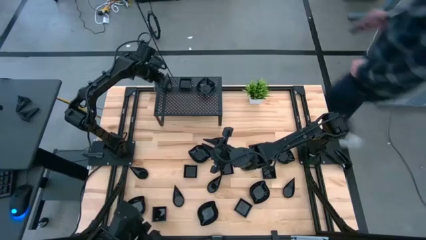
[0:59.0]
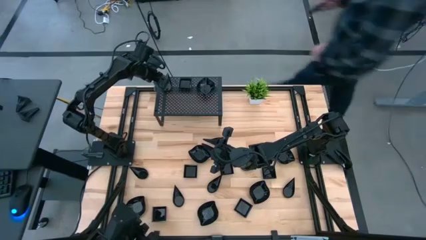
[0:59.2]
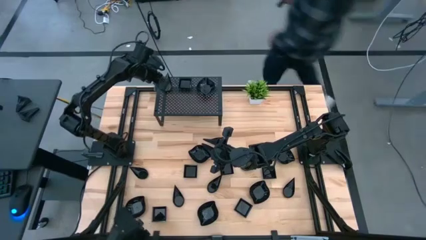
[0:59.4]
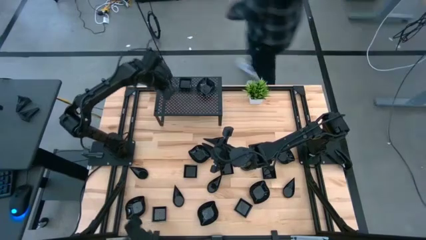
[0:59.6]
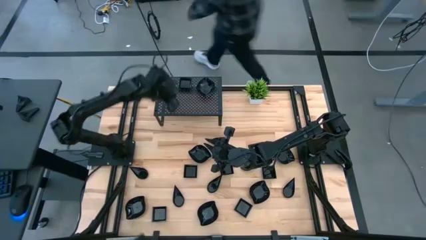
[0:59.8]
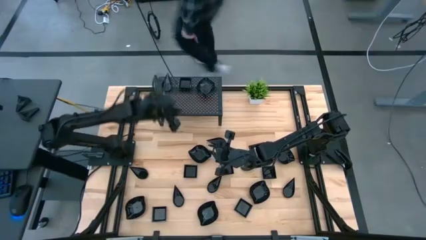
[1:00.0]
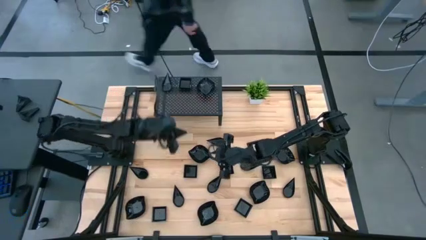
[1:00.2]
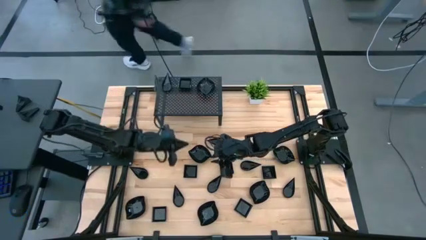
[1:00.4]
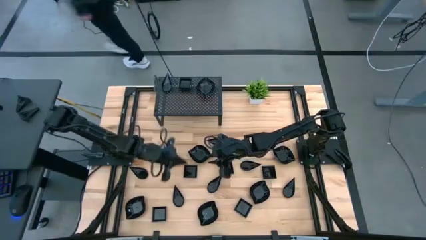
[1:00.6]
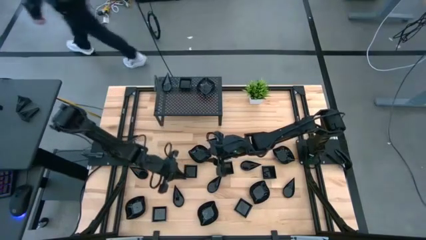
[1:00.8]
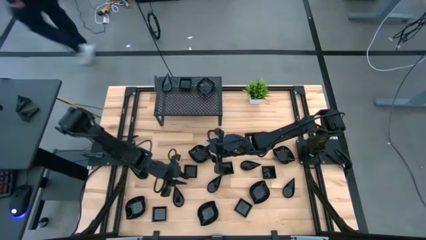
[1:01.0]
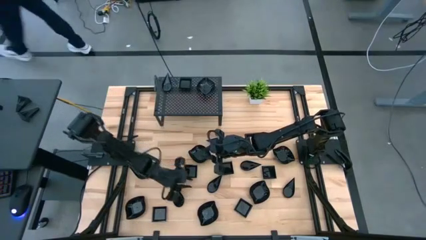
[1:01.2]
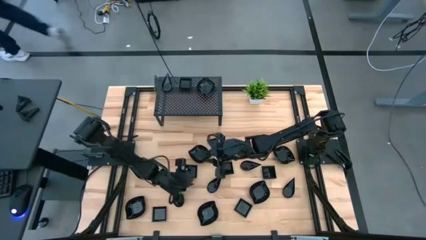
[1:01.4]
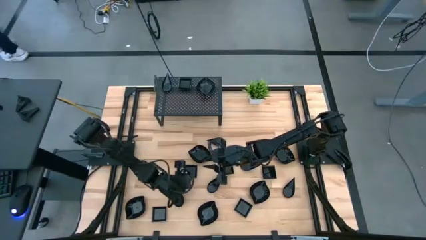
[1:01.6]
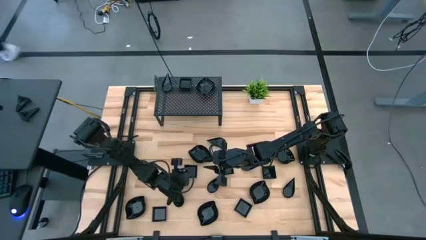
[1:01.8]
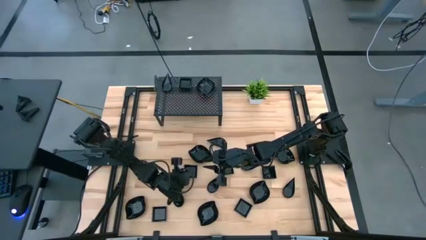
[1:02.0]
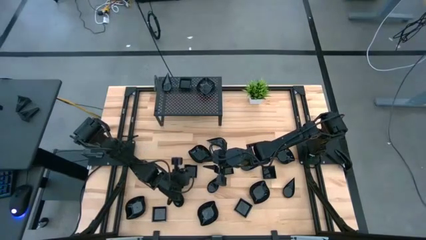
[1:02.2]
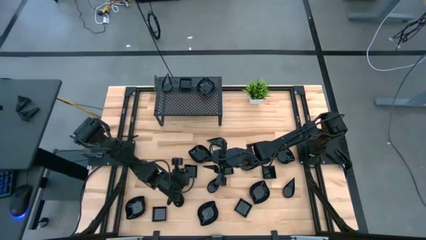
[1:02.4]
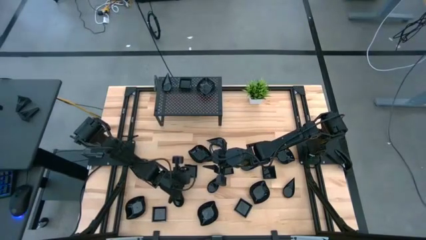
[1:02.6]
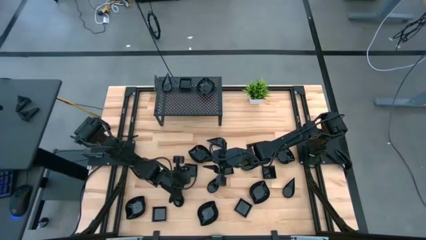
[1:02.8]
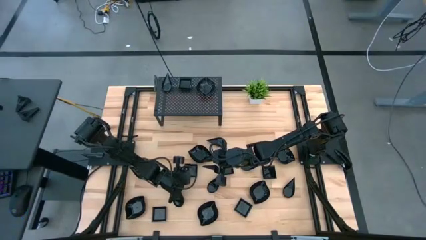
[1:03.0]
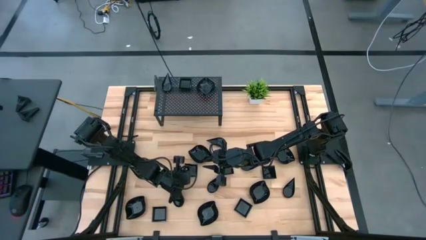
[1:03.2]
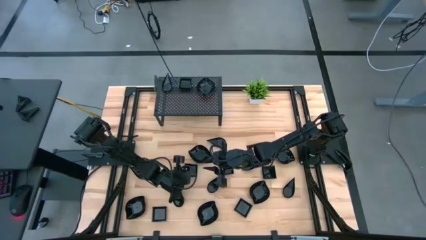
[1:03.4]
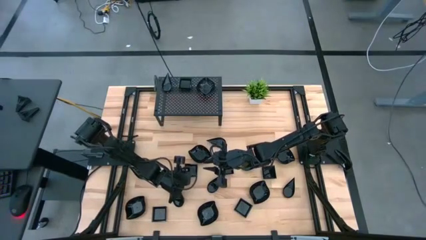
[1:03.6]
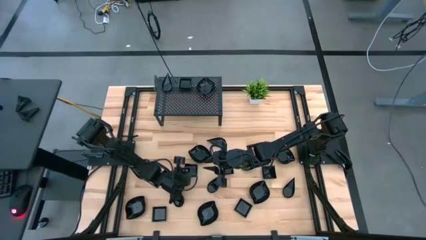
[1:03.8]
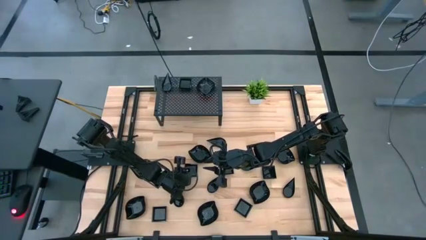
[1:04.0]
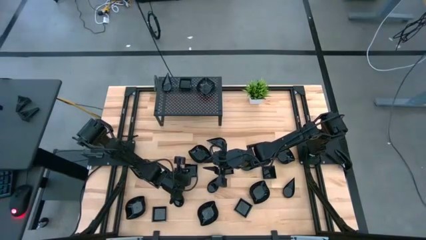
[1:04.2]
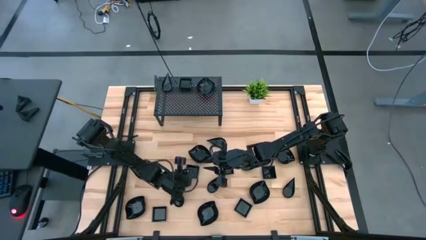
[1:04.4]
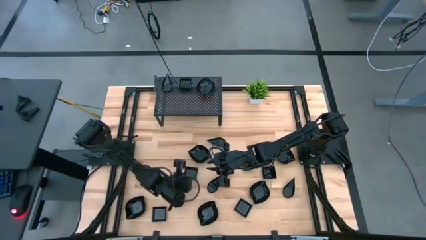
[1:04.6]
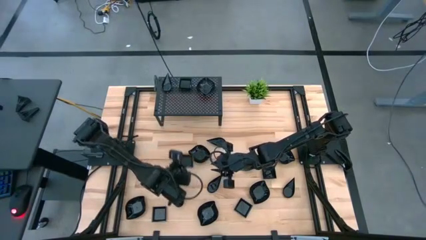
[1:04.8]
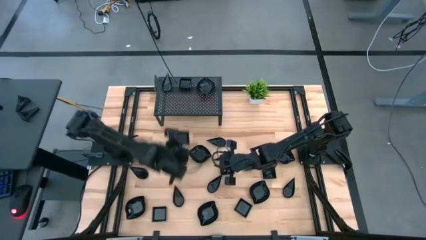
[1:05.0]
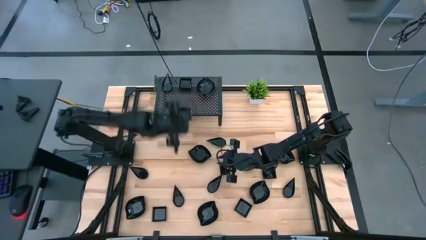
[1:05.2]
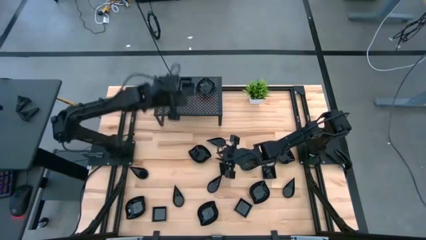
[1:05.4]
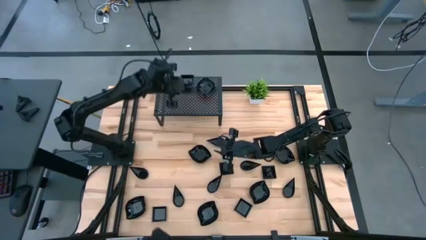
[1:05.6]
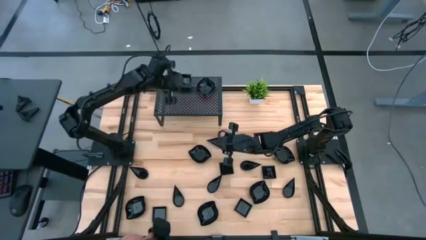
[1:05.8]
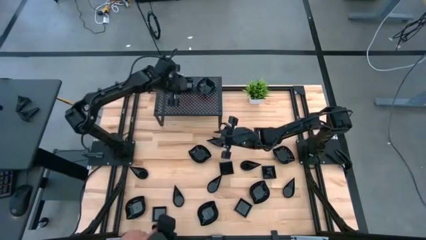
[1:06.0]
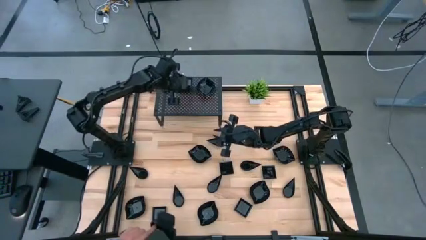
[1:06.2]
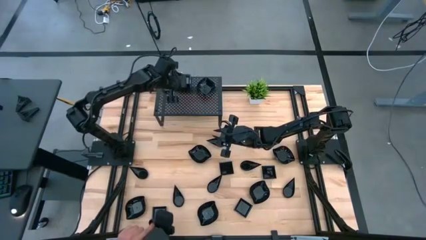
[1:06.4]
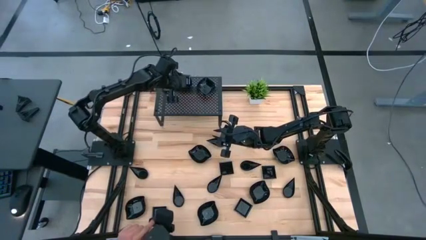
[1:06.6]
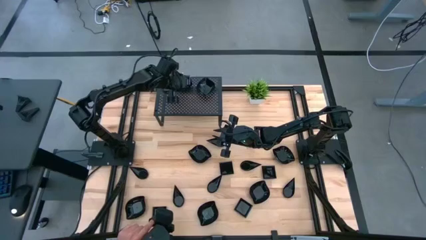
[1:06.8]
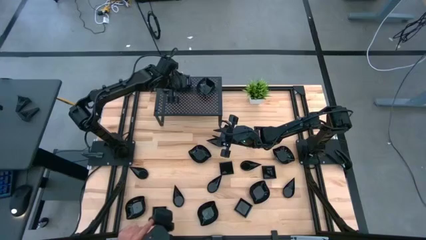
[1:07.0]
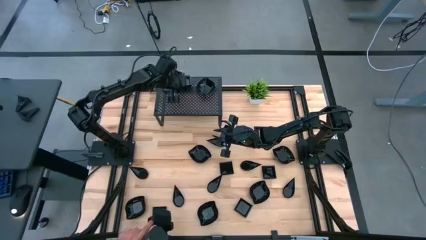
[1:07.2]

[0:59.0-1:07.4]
Task: Pick & Place Mini shaped plates
Stack the black square plate on top of the square plate on the shelf

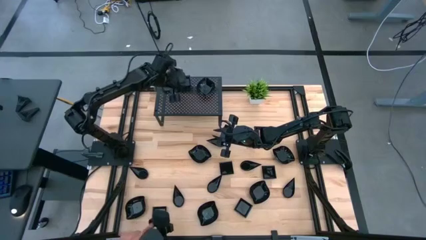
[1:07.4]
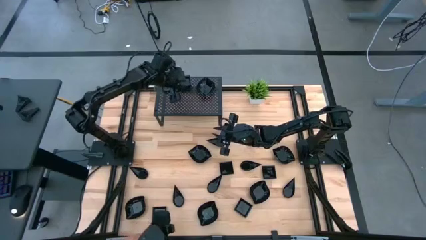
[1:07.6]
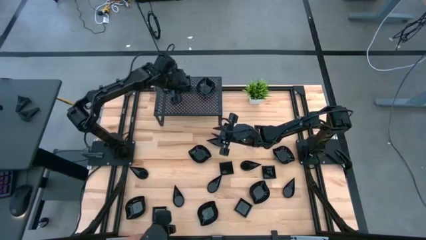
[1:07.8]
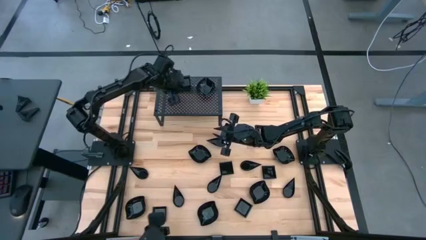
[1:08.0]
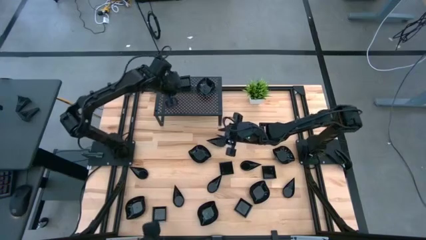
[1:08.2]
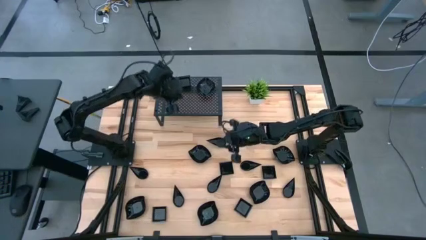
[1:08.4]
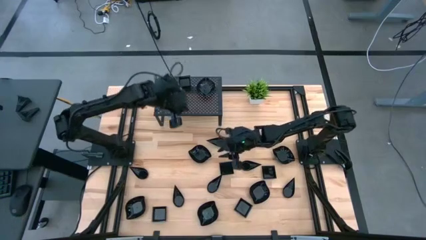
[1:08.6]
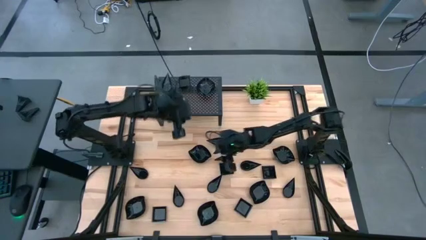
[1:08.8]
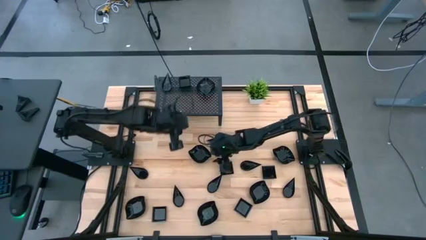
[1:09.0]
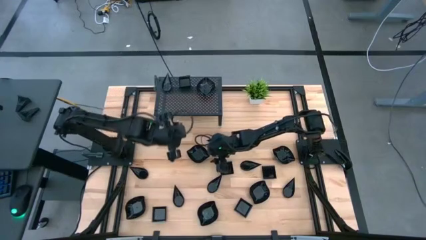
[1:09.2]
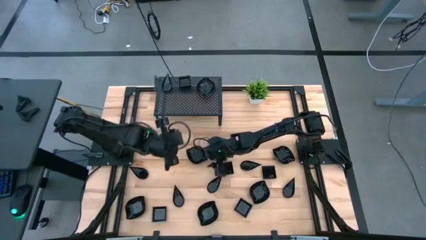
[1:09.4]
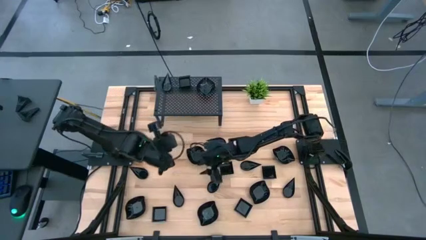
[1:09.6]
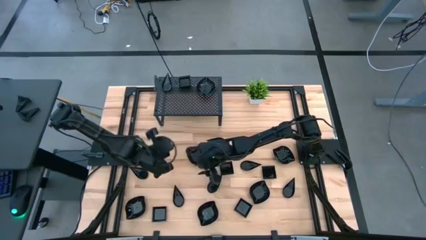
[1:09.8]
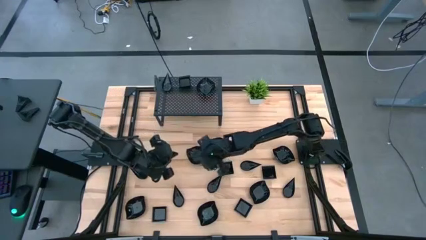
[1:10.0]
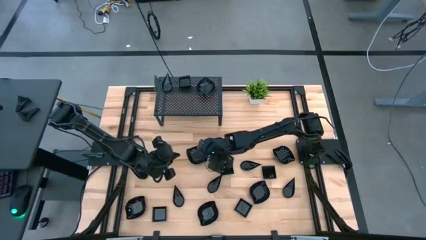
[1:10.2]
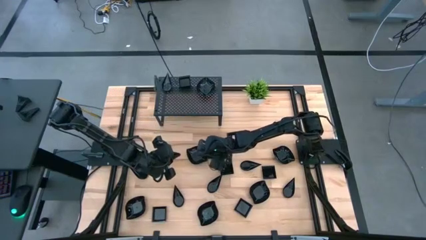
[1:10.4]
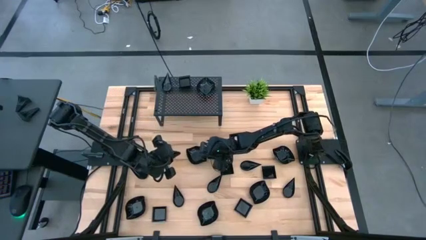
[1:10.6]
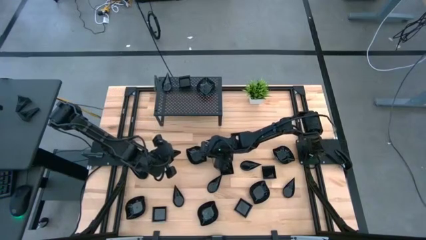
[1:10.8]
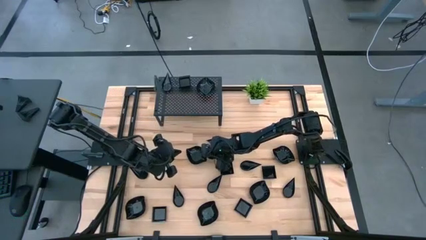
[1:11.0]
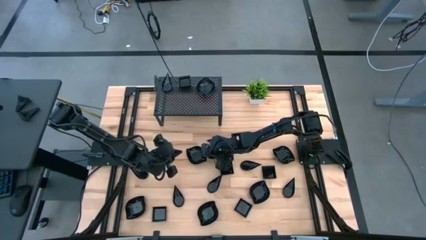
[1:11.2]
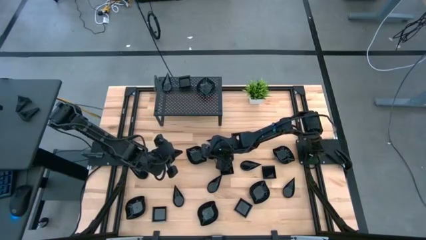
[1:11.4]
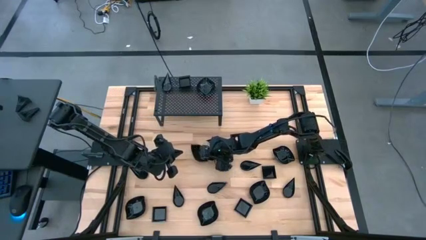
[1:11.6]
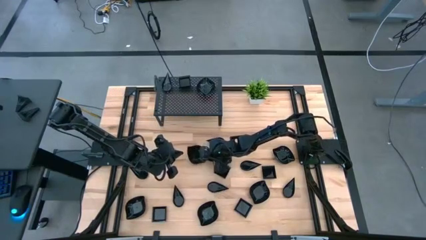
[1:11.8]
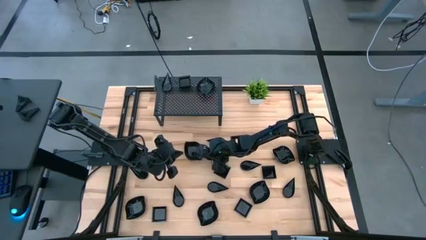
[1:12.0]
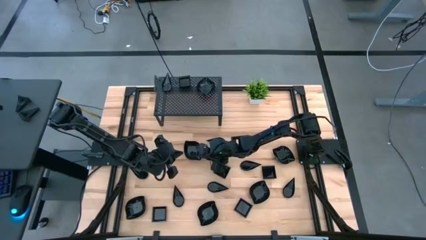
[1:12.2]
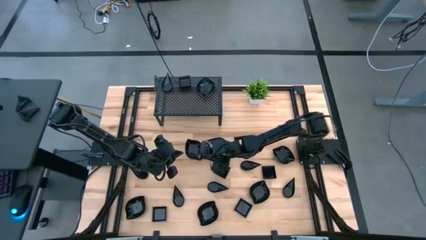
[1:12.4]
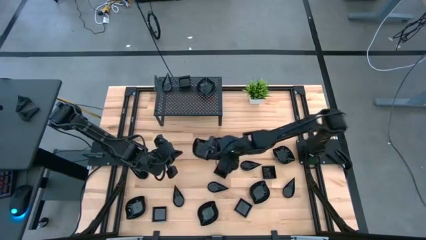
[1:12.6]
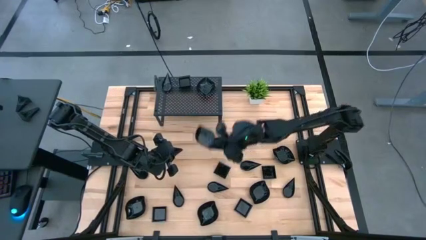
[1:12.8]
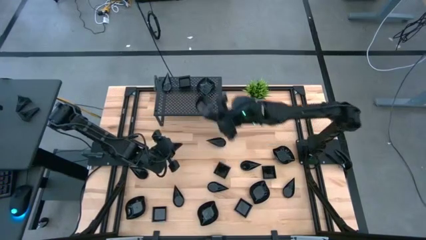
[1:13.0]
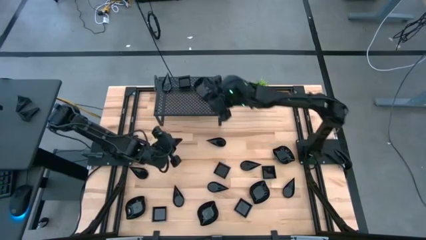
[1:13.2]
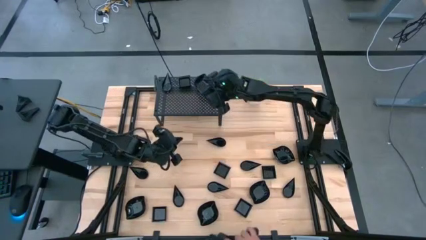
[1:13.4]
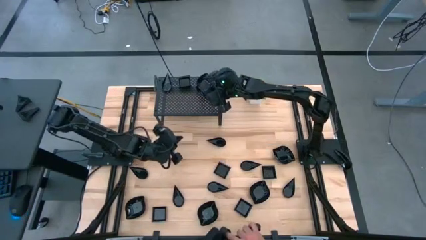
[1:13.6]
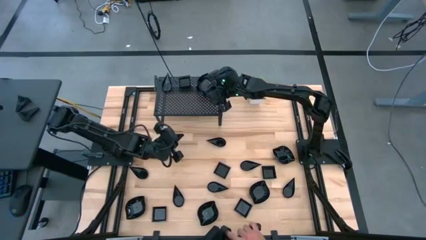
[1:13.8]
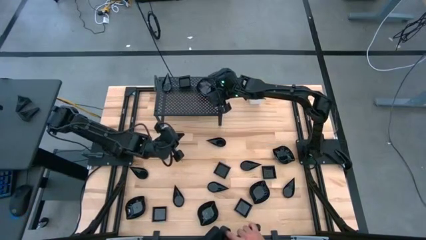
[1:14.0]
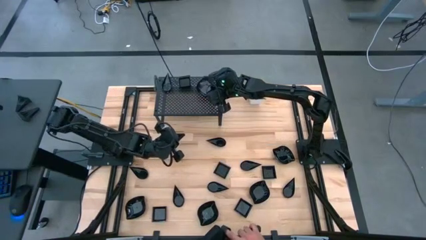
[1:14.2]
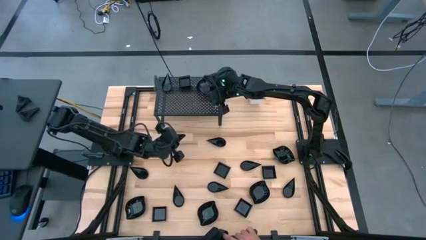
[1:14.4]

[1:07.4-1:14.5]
Stack the black leaf-shaped plate on top of the leaf-shaped plate on the shelf
